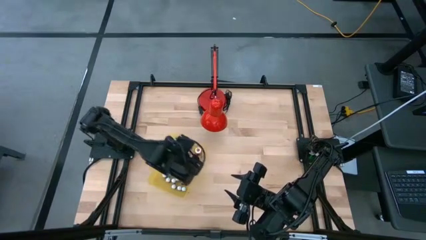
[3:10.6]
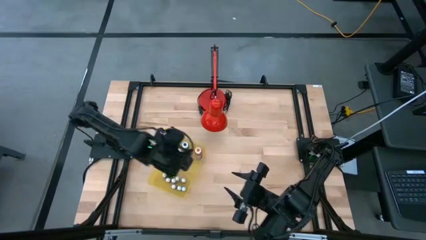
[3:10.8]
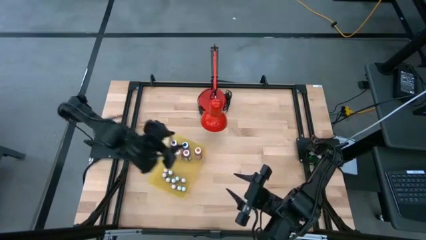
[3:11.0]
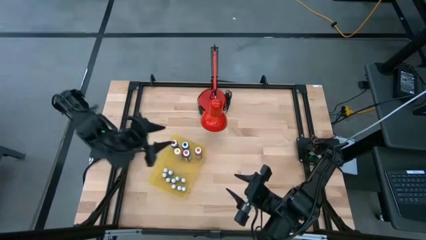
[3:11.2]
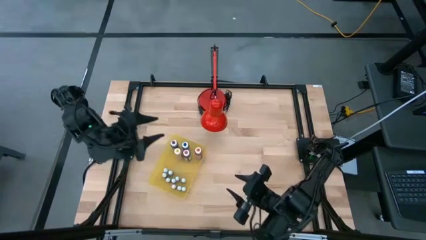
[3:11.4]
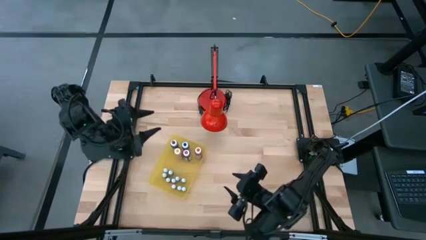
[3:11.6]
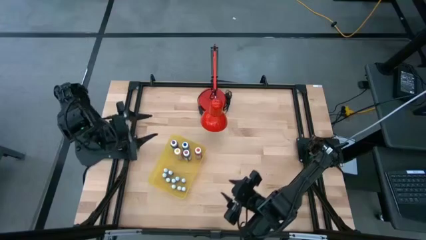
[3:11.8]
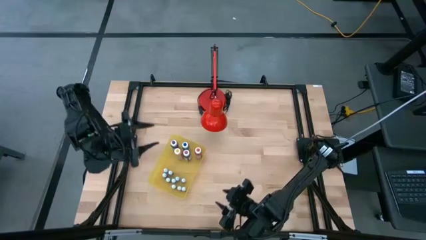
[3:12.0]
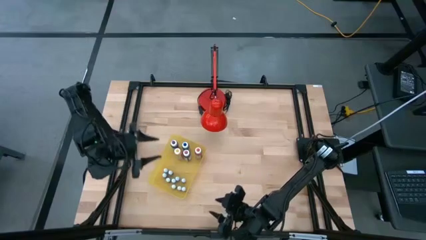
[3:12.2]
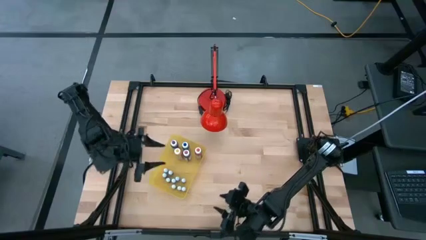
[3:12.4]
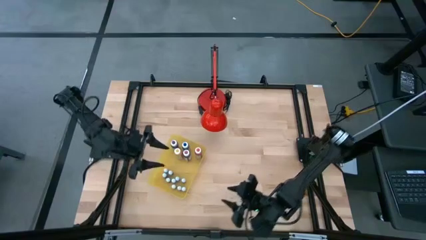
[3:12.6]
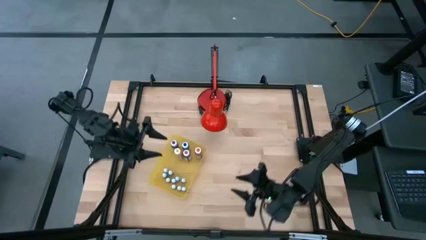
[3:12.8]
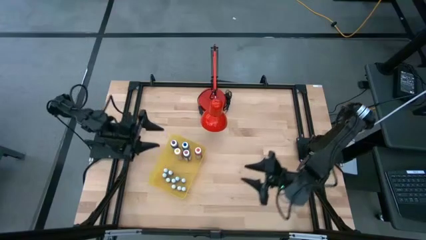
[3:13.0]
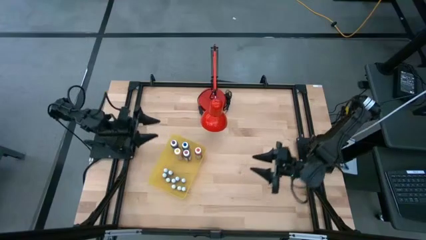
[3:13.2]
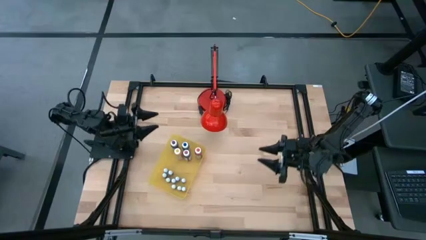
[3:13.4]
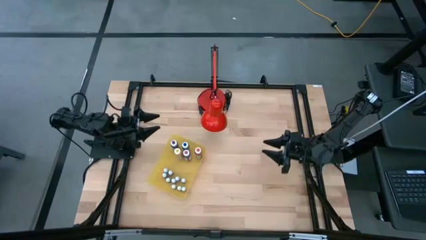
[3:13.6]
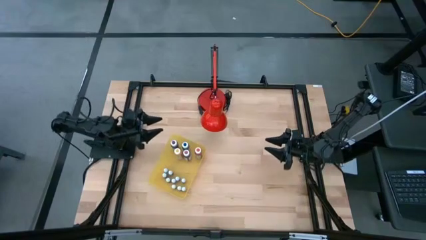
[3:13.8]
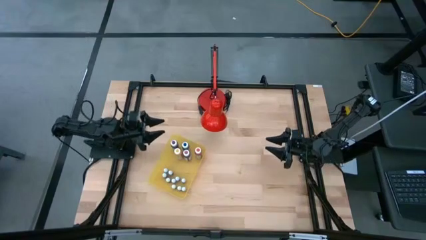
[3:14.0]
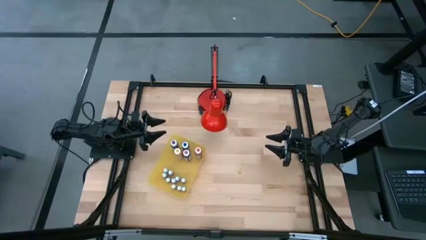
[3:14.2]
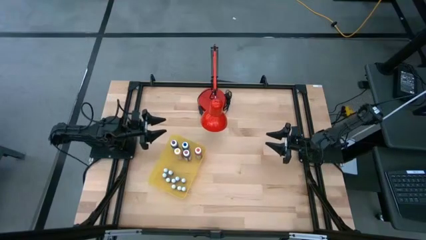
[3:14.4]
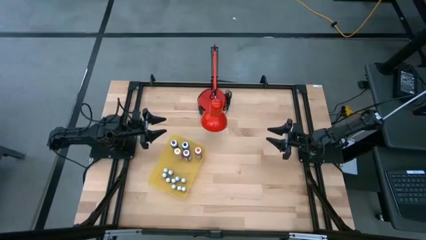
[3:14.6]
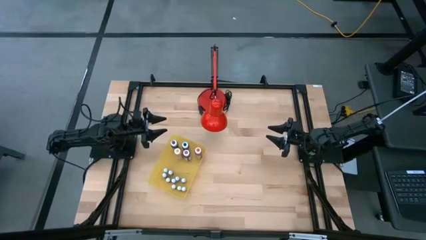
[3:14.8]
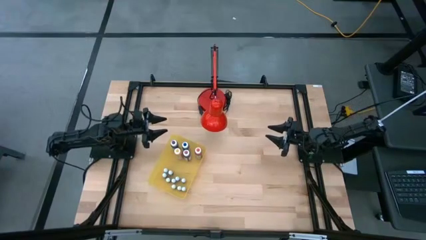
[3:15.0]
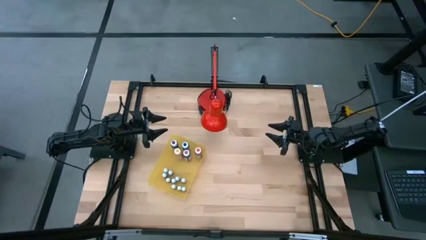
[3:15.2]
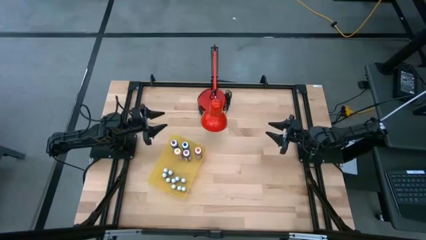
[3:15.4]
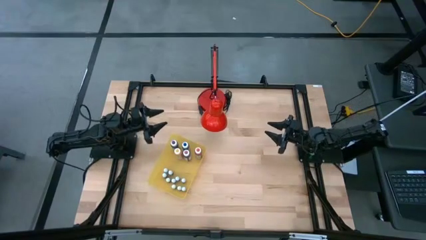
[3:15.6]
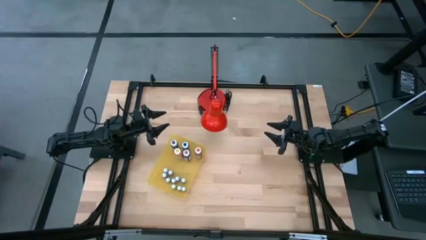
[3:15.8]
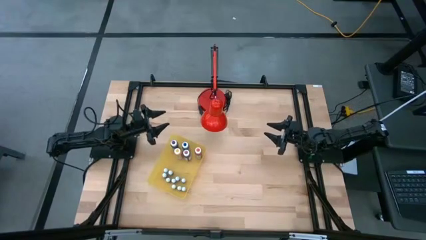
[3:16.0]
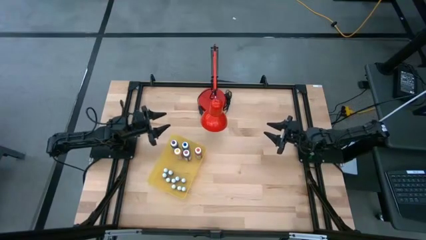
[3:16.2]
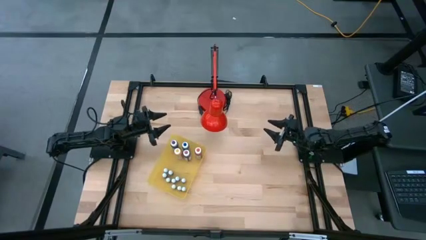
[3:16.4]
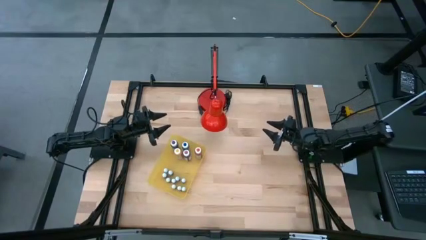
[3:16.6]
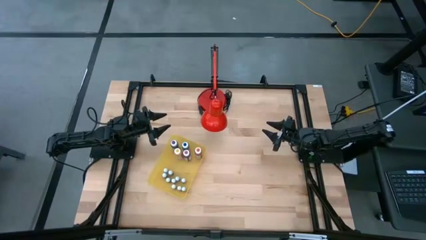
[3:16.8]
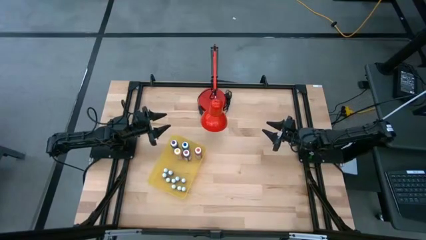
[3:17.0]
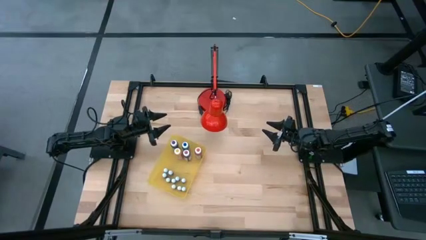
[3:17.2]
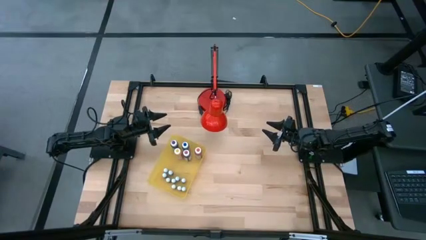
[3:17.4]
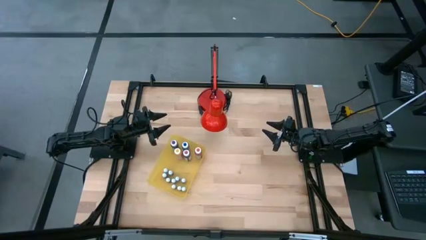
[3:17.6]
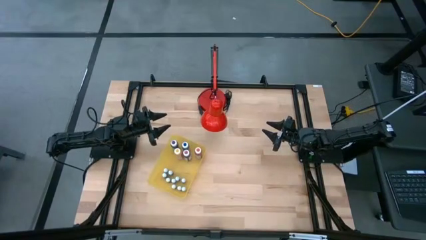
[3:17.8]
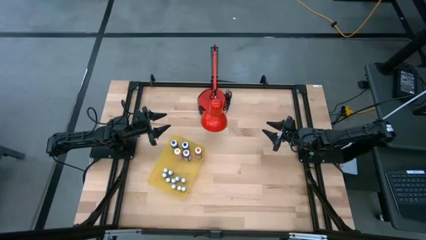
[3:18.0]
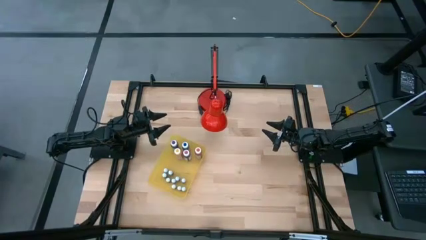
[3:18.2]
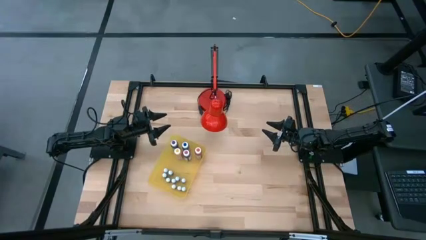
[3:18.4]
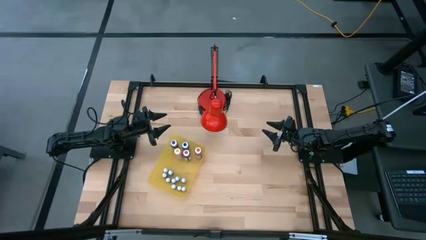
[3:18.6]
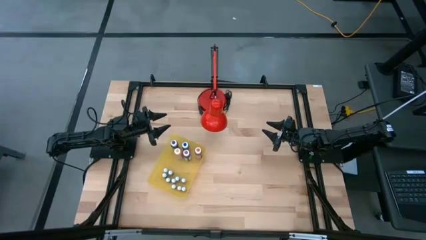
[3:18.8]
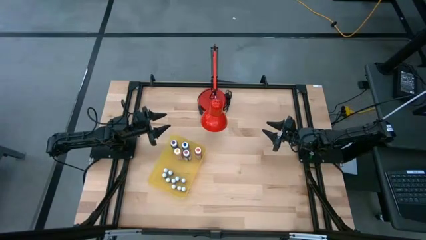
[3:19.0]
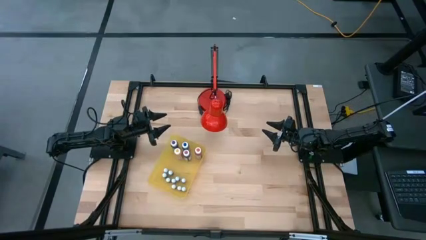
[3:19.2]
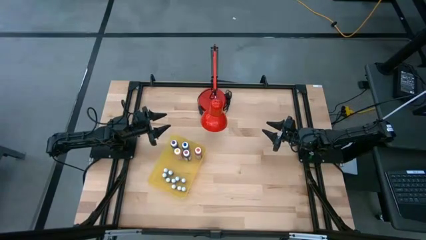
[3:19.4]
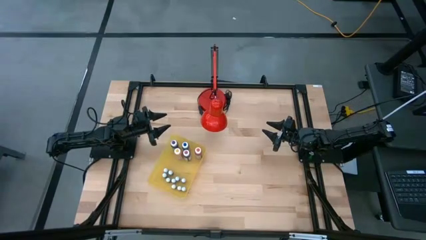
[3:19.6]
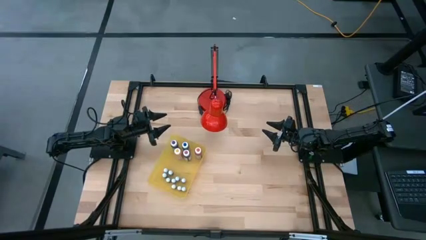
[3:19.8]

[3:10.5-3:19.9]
Task: Pick & Place food coloring
Return to Home Position

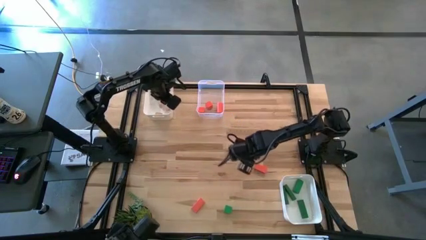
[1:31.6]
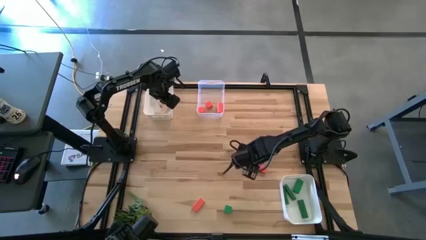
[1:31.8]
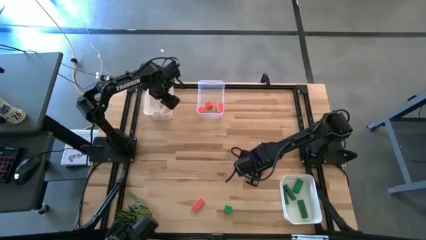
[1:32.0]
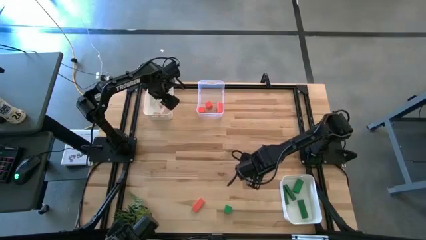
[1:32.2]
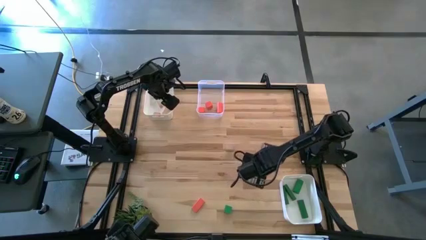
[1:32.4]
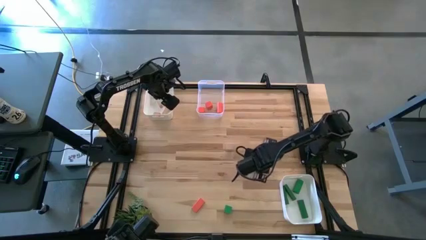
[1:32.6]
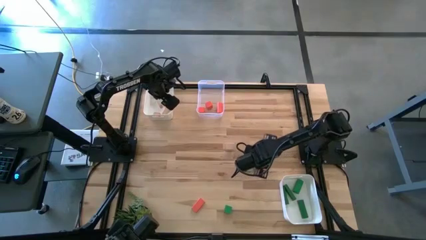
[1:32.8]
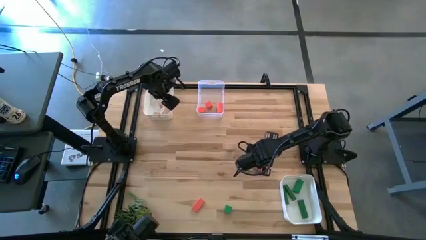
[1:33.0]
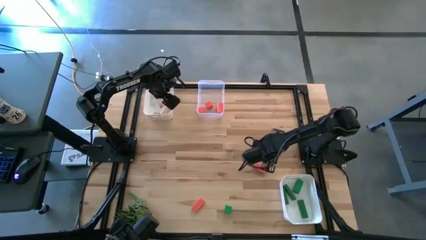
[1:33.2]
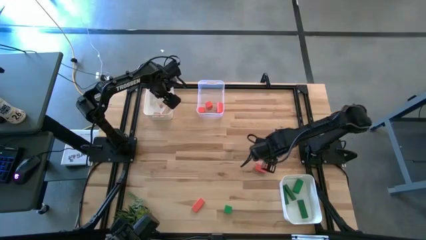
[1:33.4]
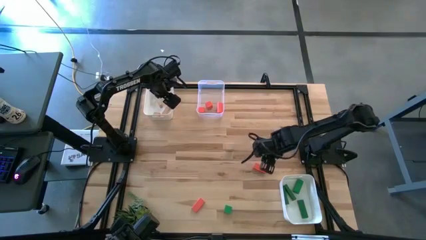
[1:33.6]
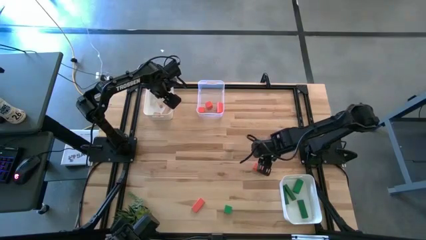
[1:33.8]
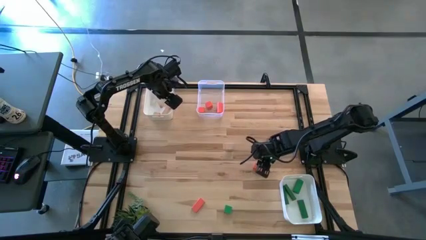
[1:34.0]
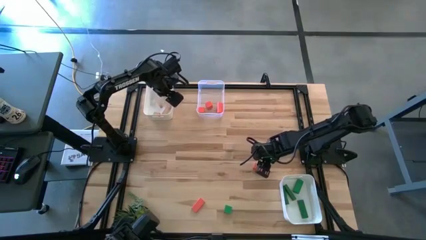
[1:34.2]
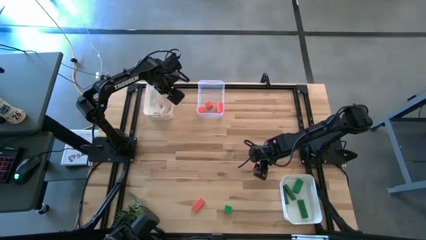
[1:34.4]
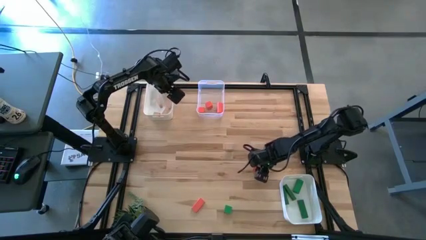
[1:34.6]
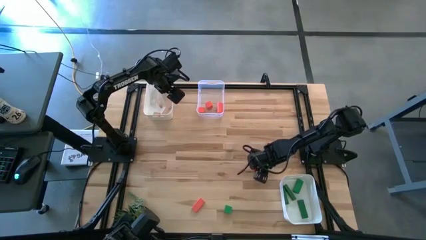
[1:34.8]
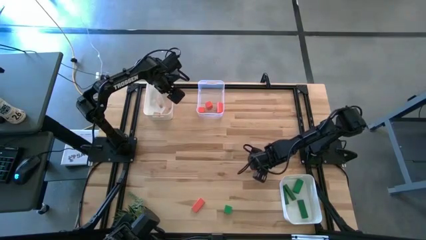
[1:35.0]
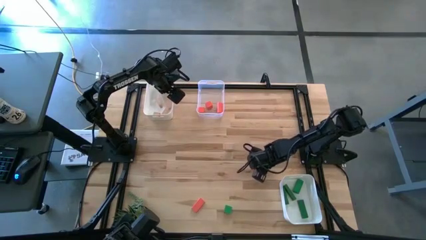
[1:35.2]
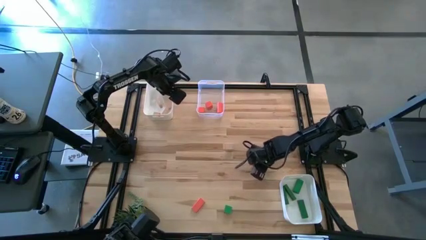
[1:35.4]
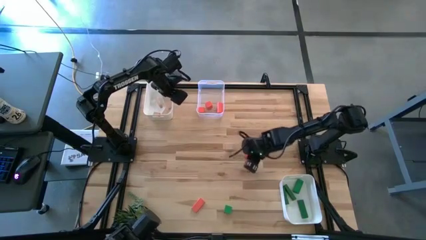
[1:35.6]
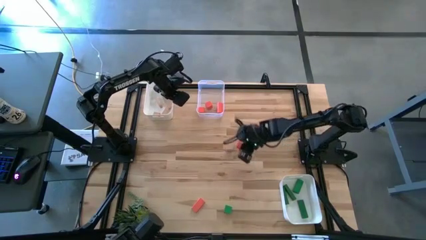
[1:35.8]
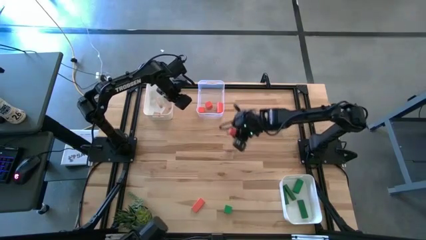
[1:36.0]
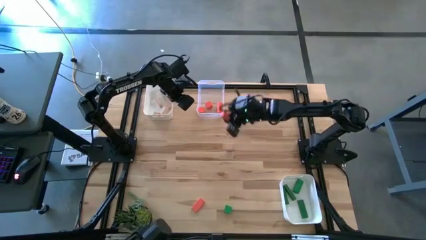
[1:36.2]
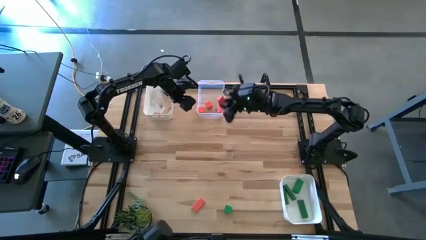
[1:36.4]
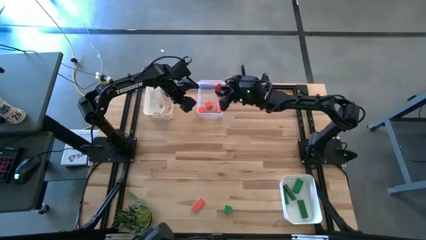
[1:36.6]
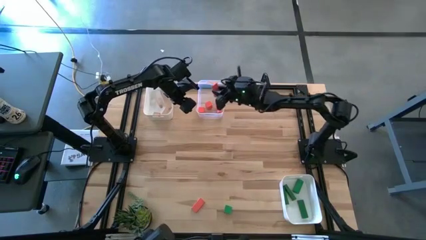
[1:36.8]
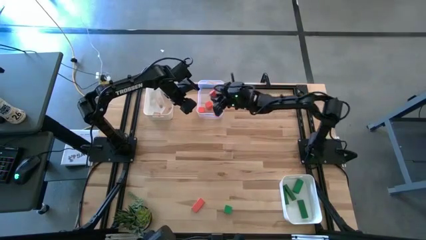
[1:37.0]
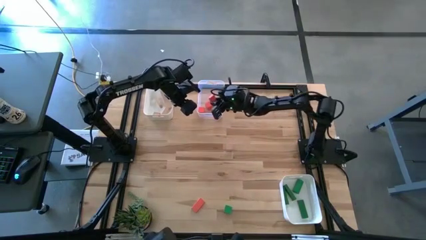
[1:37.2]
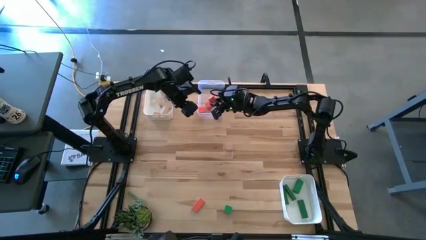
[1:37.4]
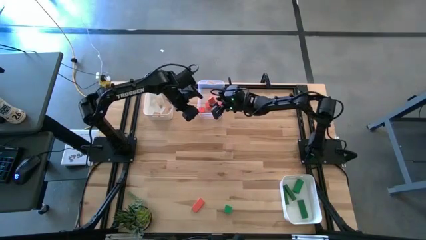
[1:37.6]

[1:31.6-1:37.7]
Task: Sort & place blocks by color
Put the orange block into the transparent bin
